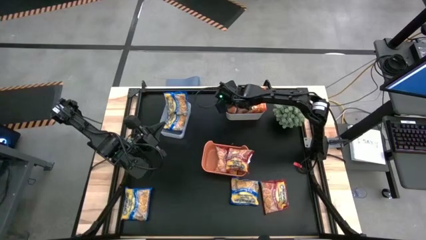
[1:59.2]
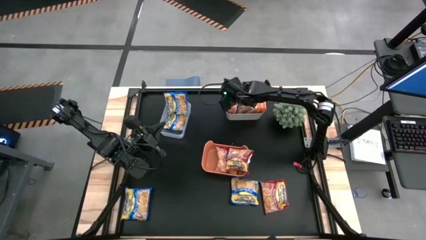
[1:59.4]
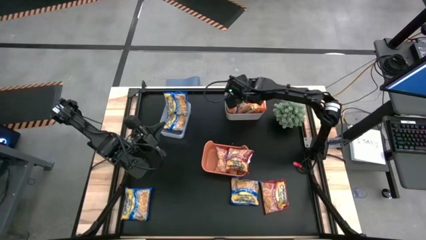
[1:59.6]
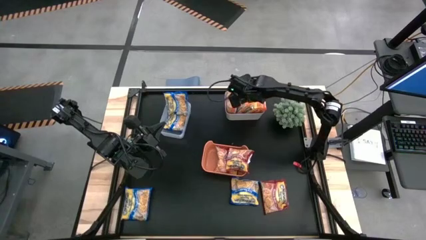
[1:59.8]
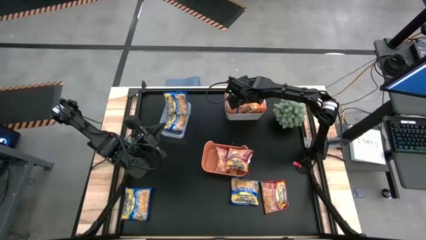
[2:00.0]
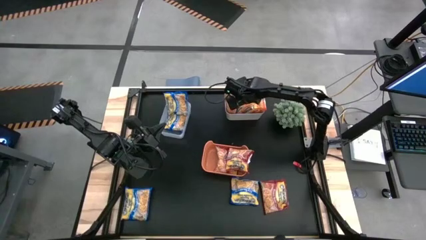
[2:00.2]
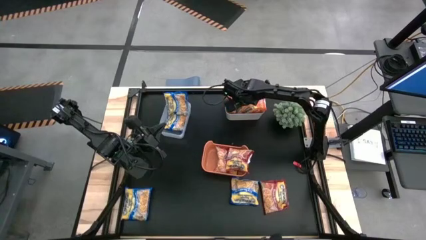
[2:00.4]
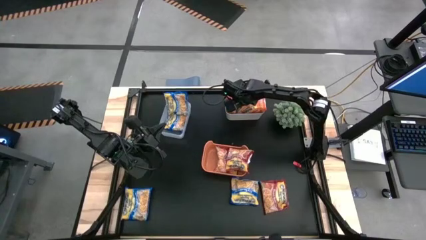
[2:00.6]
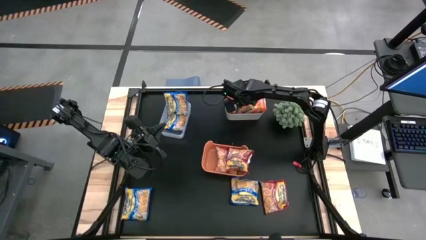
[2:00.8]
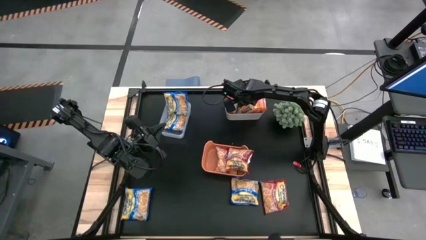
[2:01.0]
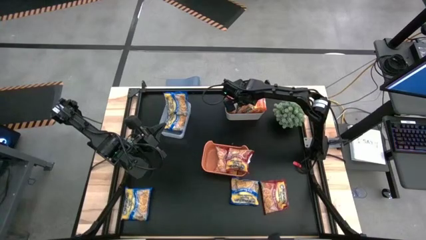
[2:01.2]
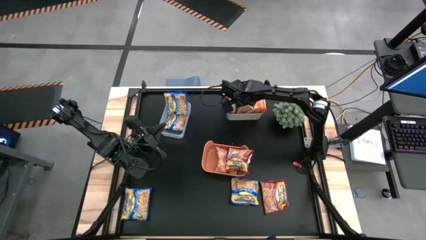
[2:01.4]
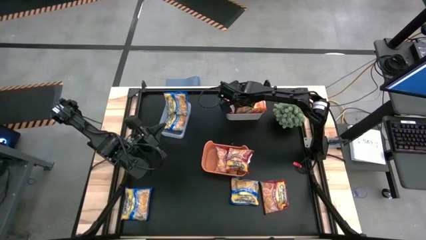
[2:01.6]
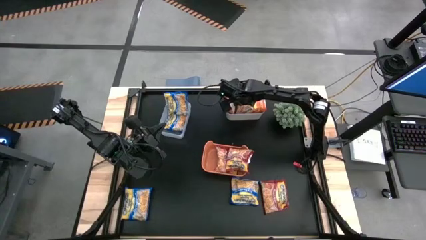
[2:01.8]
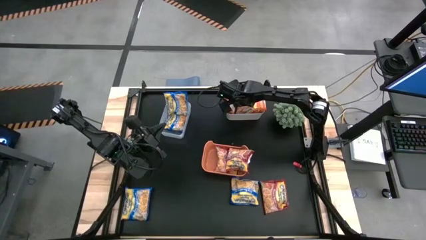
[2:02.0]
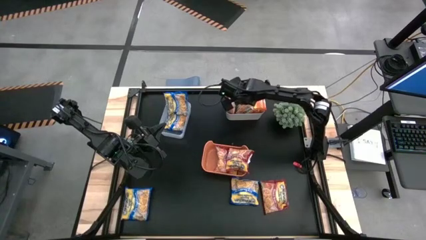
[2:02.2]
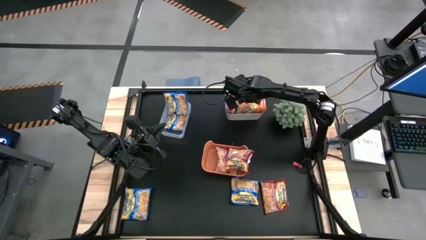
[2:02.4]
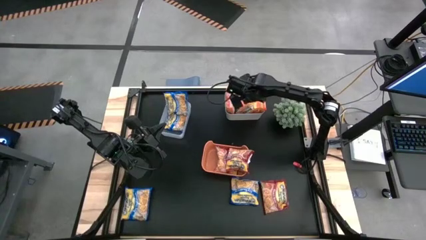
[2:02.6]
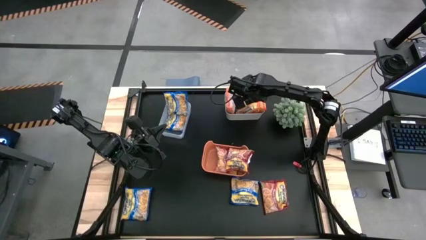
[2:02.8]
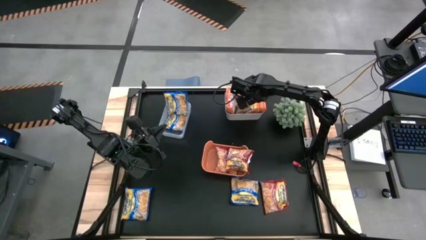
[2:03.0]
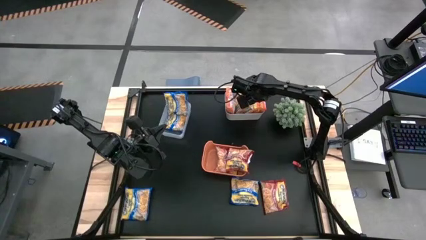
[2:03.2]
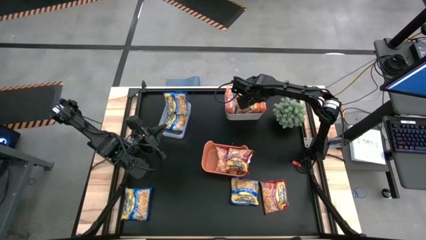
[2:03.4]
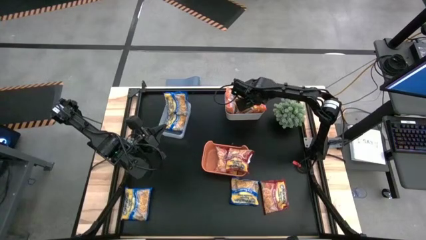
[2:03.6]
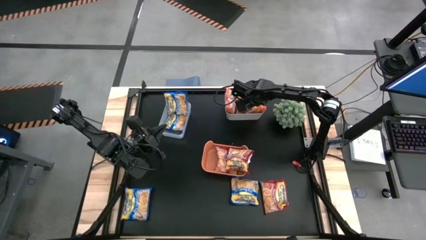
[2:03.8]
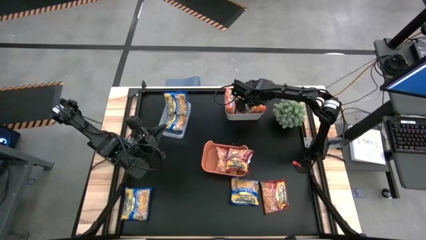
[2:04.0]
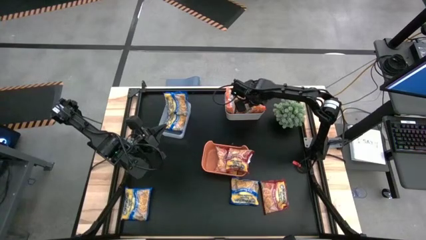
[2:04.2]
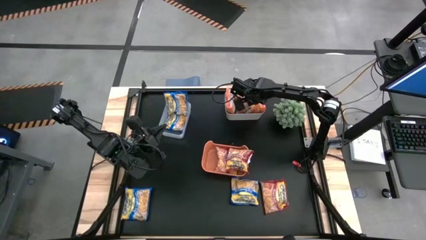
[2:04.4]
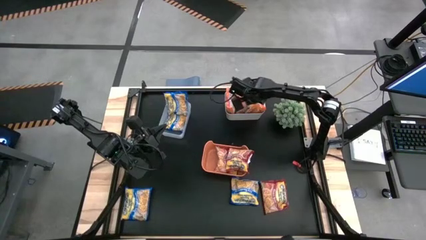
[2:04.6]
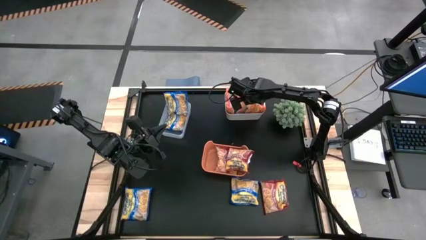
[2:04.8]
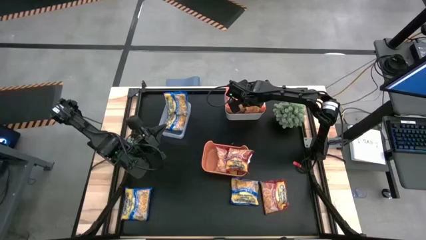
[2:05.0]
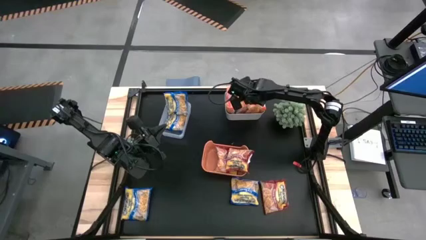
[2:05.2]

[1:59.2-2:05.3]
Task: Sort Maruchan noodles
Adjust the orange noodle packets

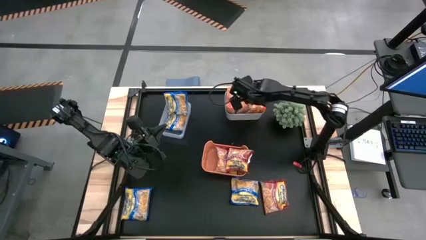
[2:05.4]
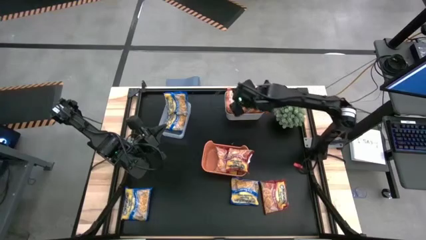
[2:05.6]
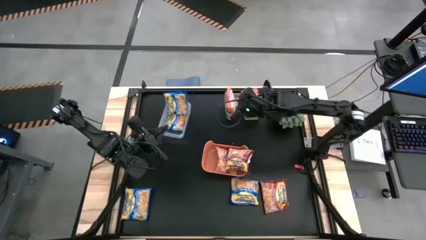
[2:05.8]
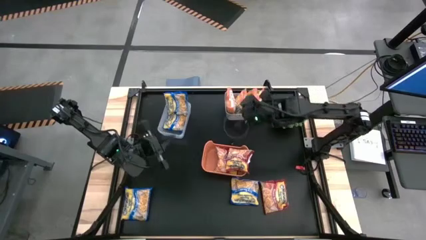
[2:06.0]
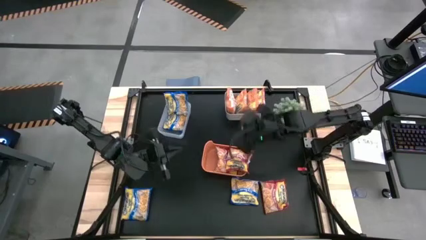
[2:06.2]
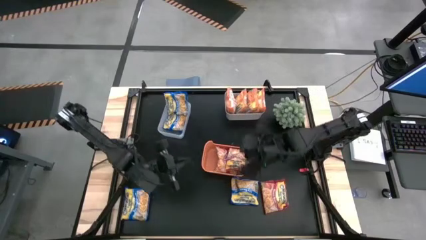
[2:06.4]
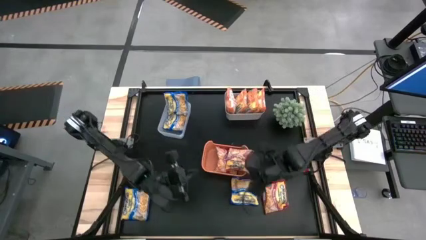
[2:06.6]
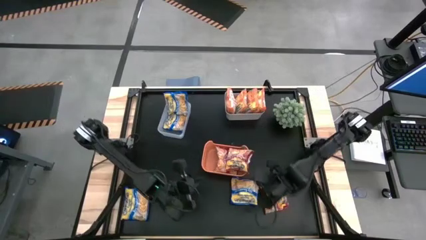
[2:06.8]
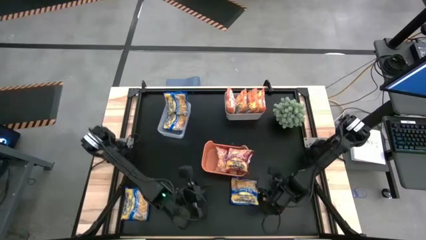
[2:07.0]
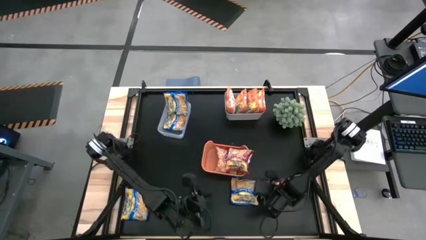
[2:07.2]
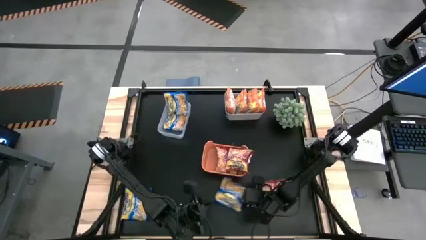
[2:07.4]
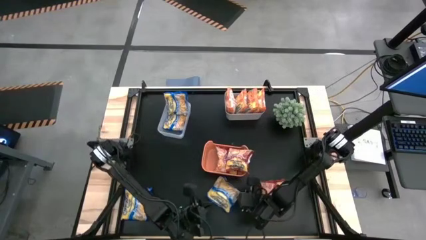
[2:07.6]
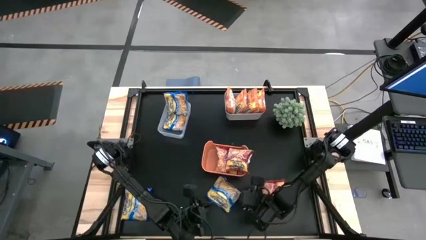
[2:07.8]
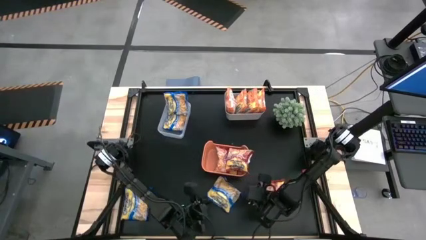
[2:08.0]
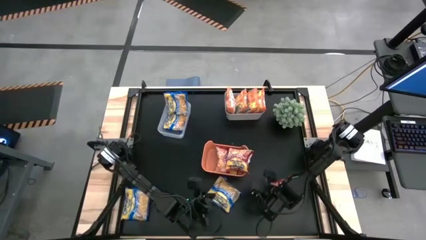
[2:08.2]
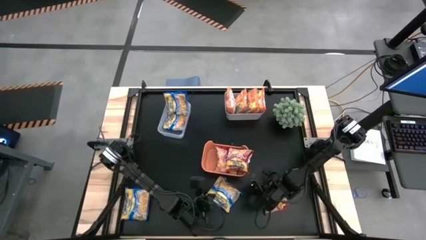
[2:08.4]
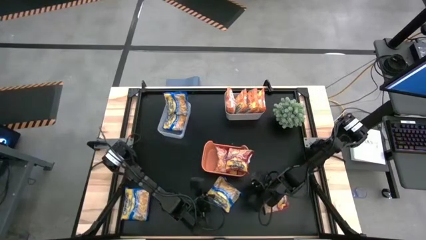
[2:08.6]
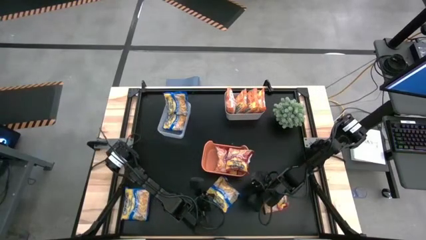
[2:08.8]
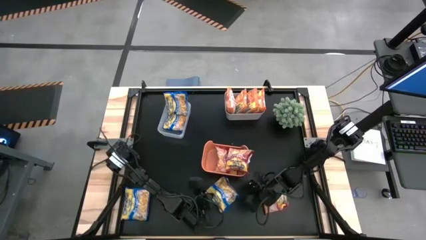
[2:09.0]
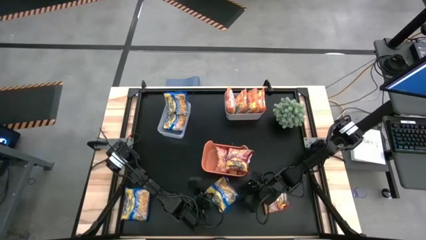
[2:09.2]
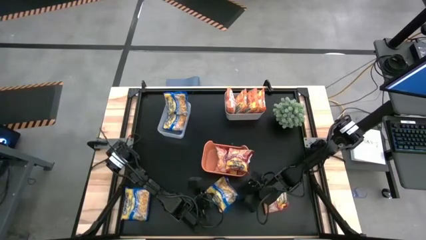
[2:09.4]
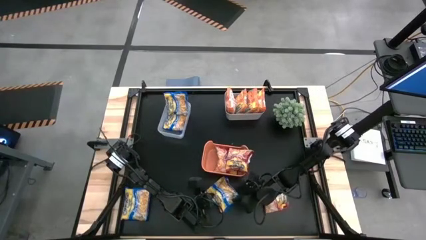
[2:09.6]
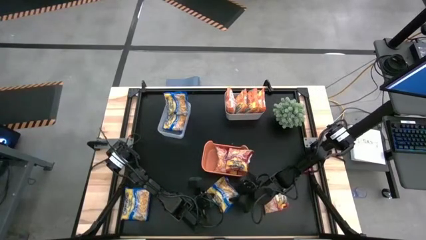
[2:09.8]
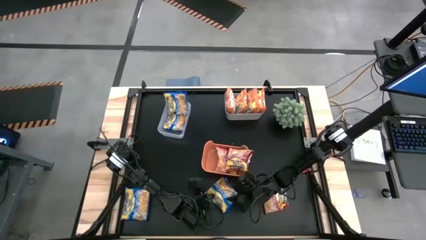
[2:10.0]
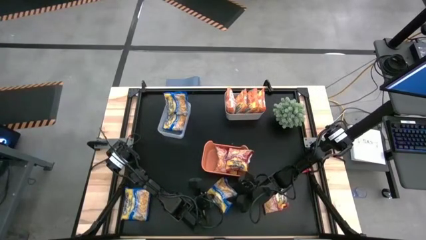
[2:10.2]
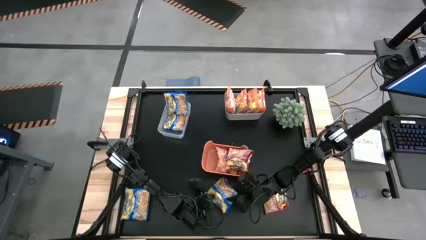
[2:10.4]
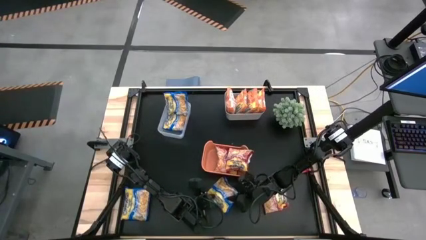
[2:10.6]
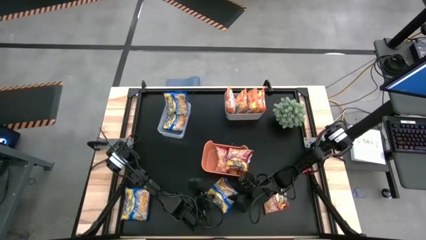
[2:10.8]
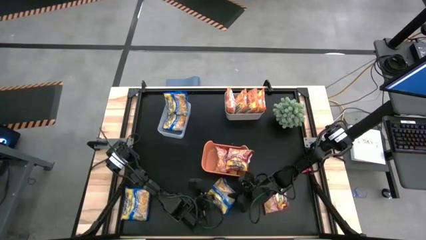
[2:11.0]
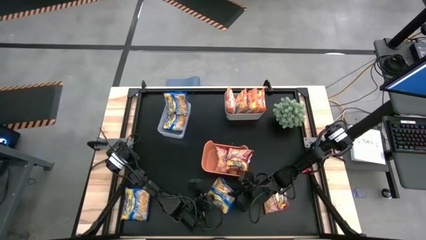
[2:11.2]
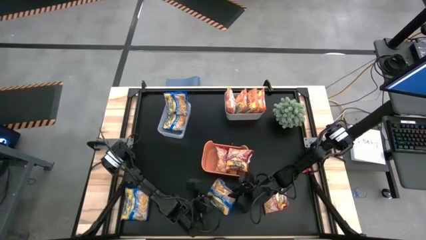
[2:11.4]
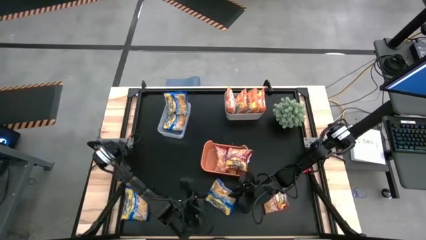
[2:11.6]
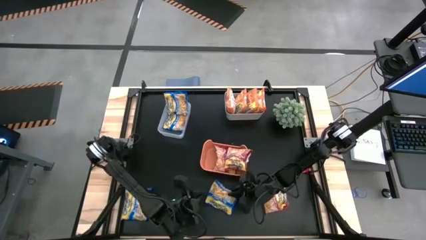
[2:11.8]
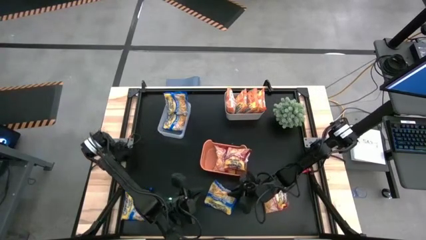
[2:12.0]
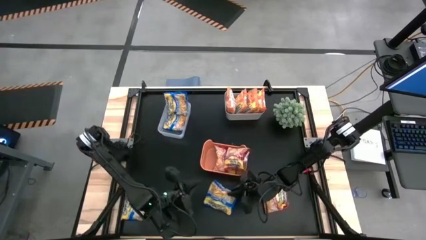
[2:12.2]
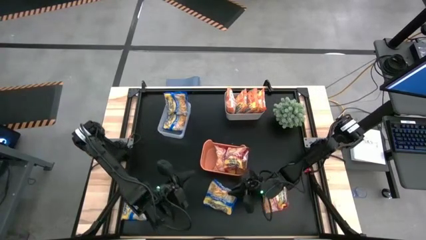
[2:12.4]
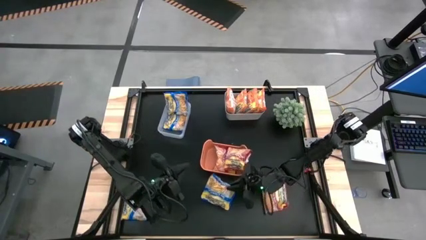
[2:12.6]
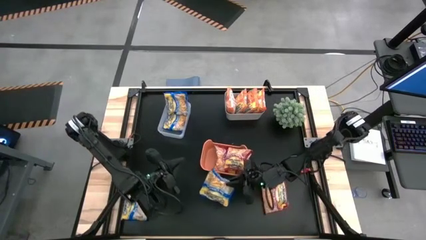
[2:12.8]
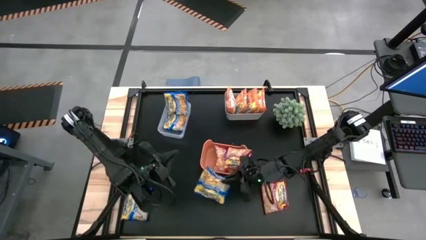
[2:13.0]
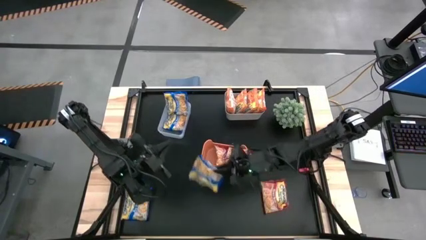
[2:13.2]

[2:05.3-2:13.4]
Put the right blue noodle packet into the transparent bin
